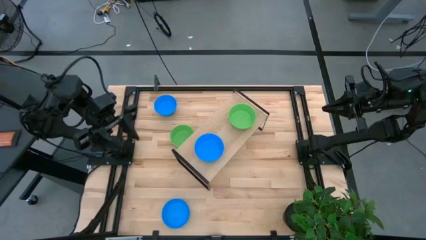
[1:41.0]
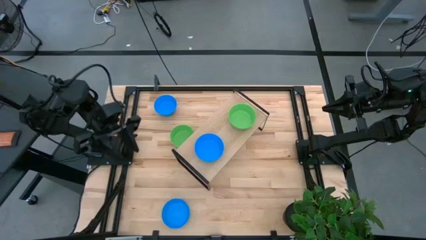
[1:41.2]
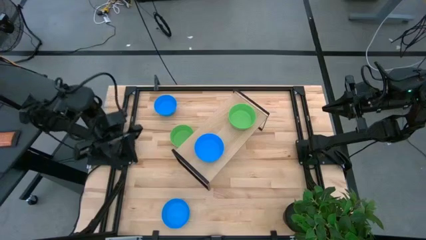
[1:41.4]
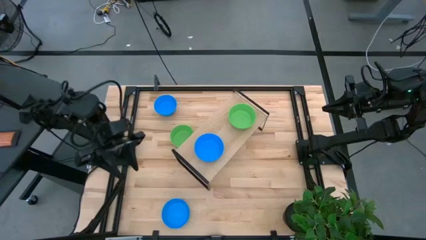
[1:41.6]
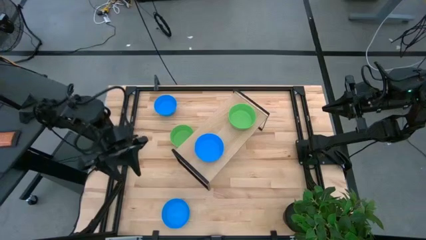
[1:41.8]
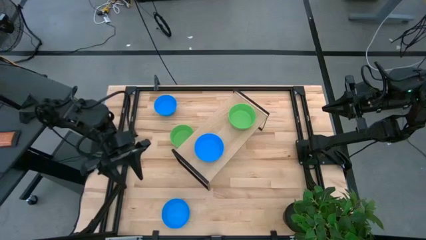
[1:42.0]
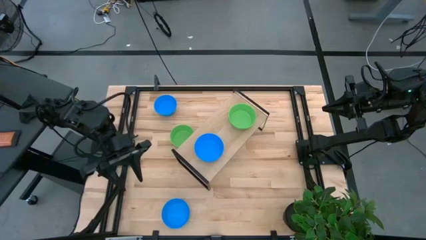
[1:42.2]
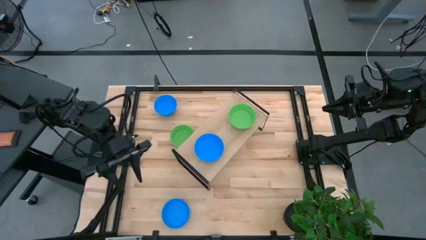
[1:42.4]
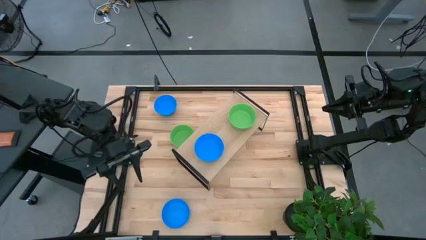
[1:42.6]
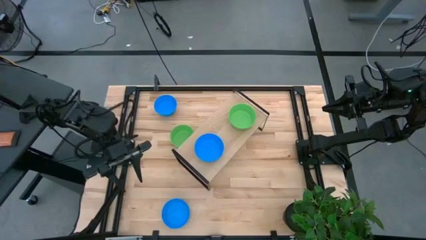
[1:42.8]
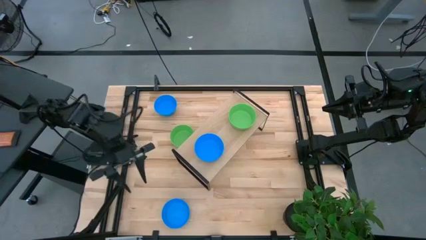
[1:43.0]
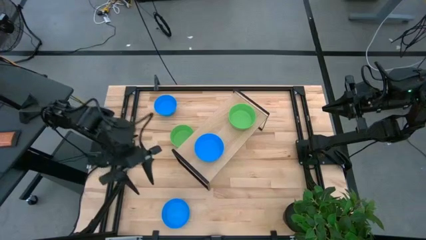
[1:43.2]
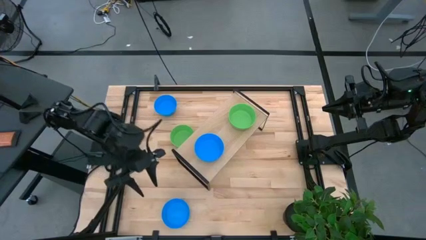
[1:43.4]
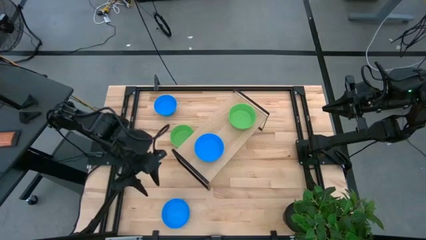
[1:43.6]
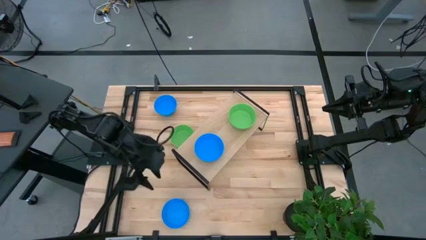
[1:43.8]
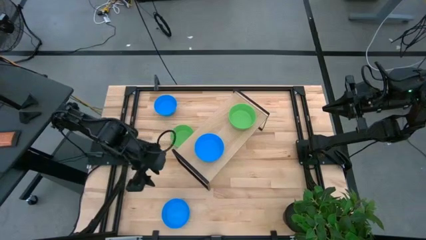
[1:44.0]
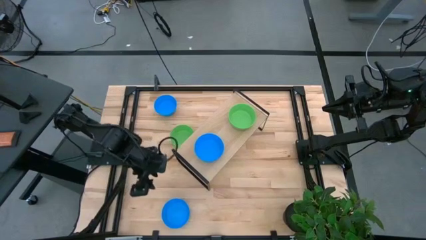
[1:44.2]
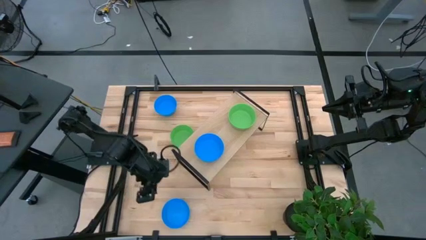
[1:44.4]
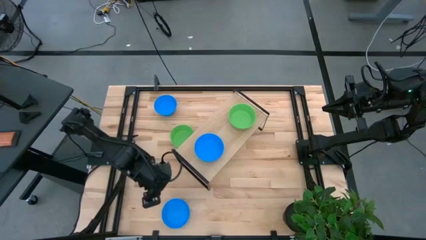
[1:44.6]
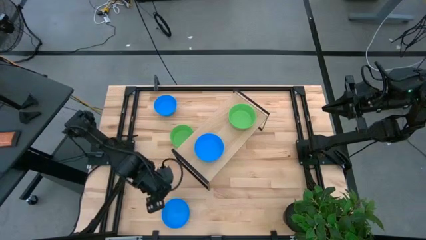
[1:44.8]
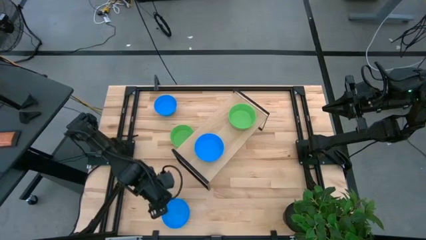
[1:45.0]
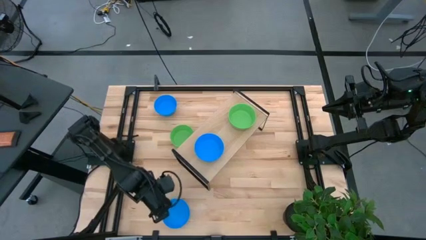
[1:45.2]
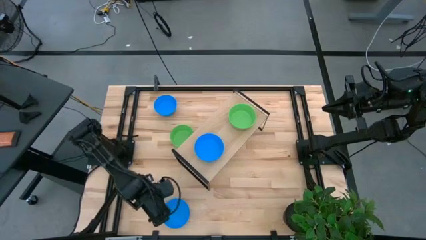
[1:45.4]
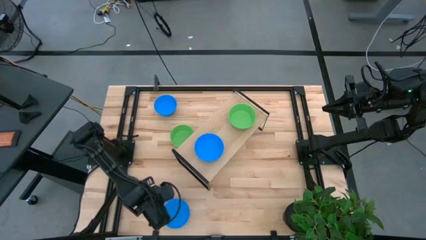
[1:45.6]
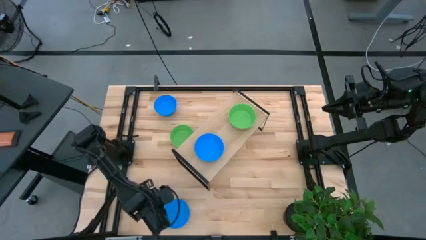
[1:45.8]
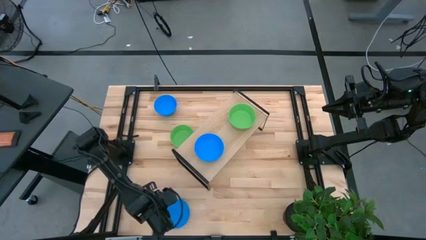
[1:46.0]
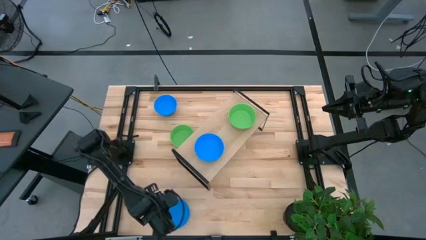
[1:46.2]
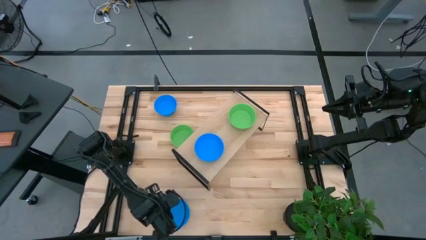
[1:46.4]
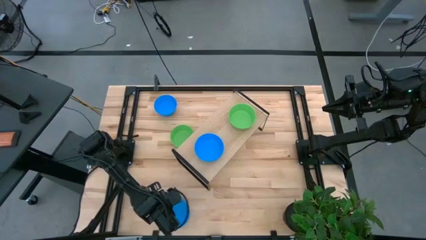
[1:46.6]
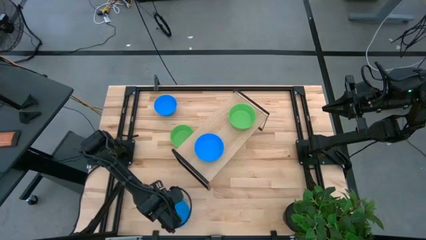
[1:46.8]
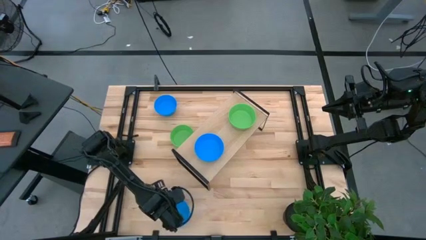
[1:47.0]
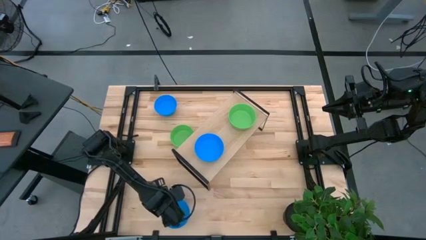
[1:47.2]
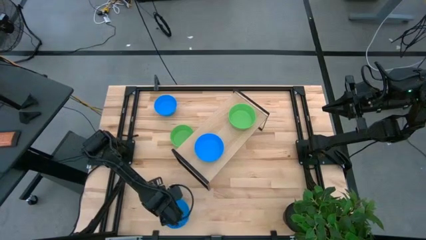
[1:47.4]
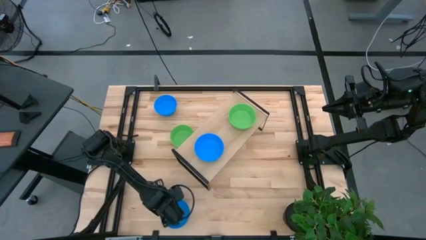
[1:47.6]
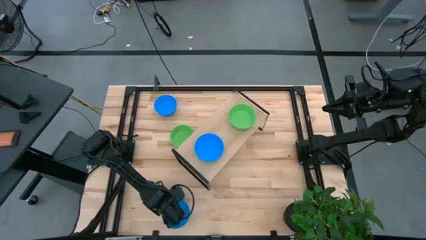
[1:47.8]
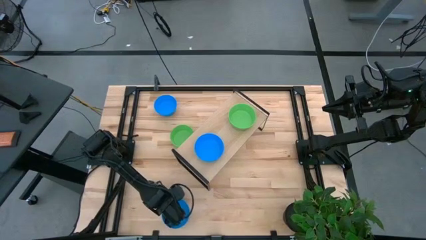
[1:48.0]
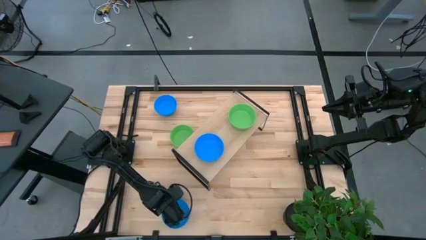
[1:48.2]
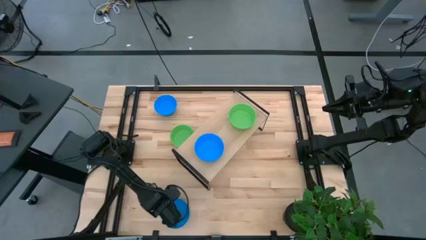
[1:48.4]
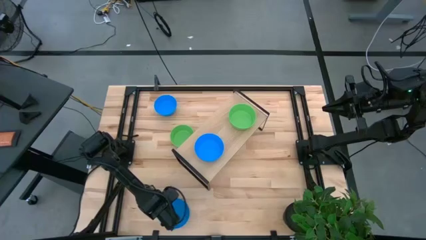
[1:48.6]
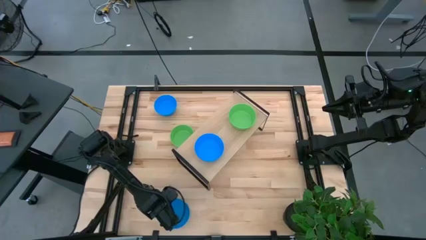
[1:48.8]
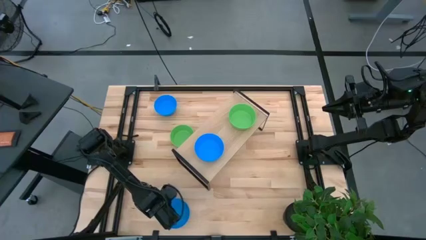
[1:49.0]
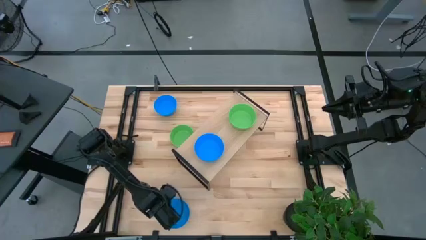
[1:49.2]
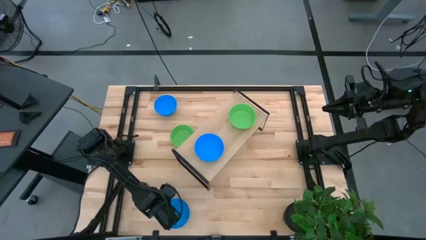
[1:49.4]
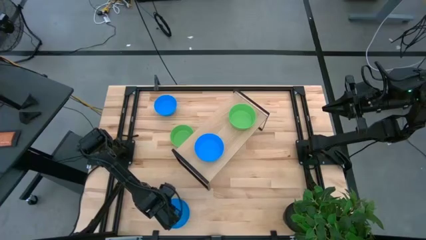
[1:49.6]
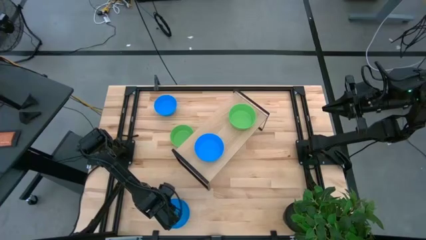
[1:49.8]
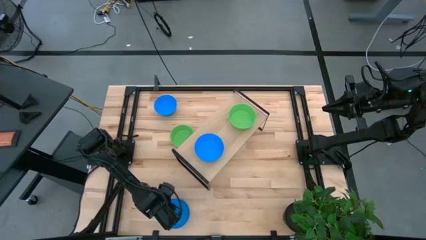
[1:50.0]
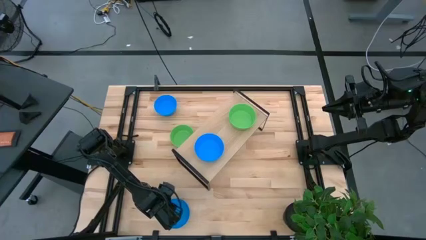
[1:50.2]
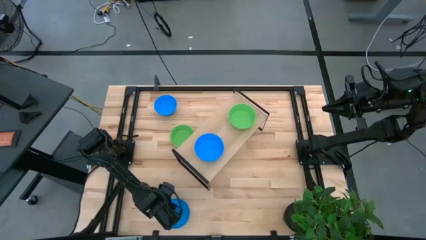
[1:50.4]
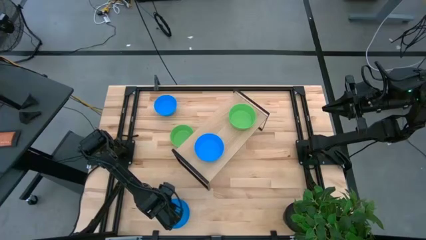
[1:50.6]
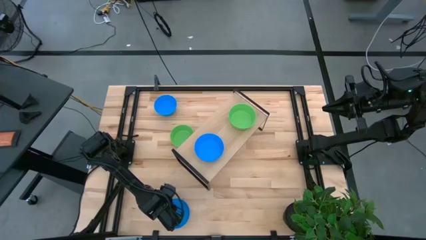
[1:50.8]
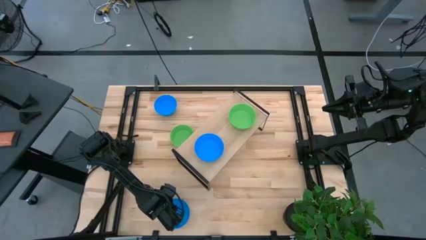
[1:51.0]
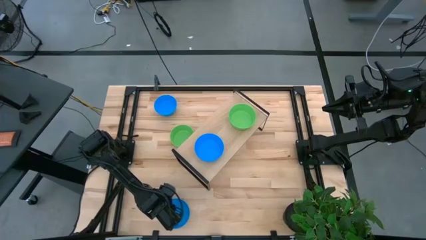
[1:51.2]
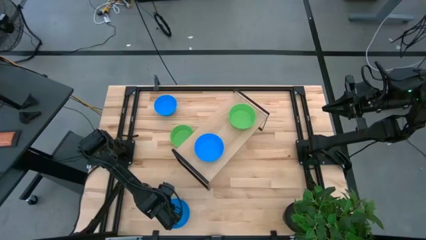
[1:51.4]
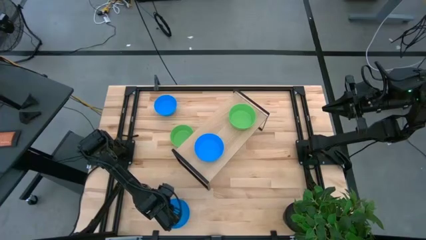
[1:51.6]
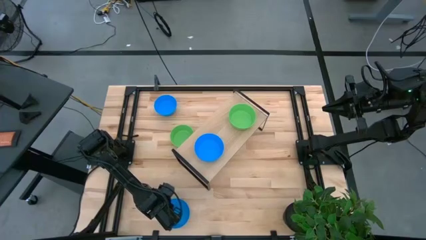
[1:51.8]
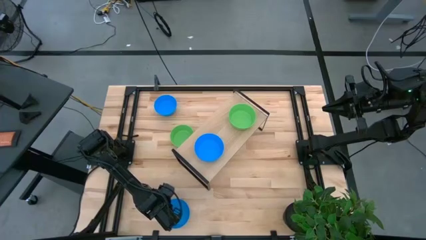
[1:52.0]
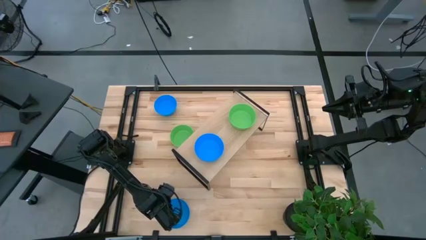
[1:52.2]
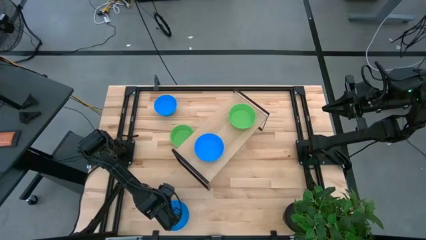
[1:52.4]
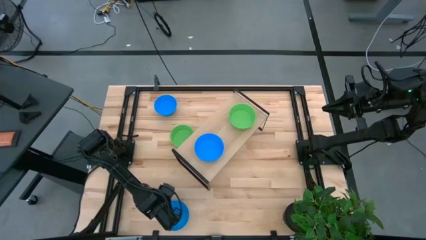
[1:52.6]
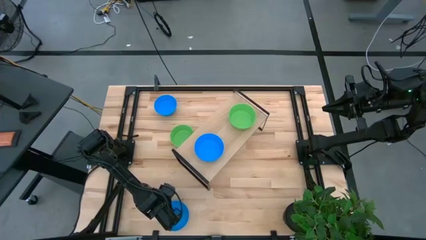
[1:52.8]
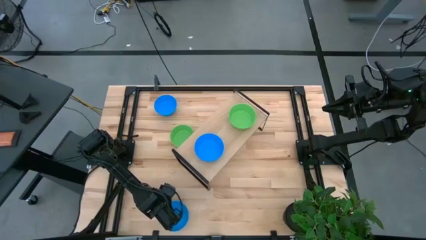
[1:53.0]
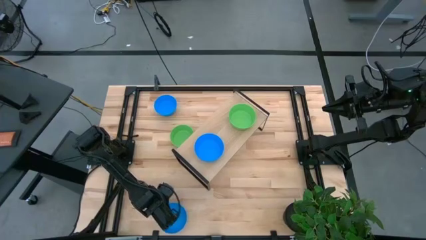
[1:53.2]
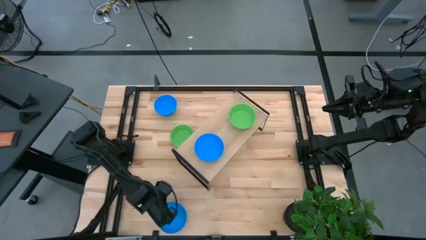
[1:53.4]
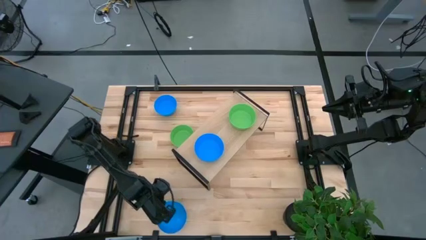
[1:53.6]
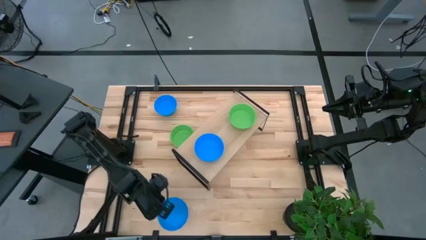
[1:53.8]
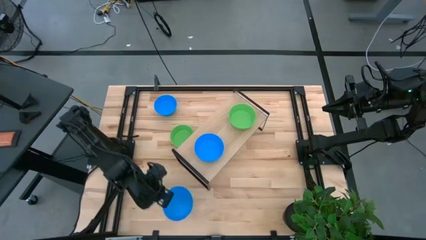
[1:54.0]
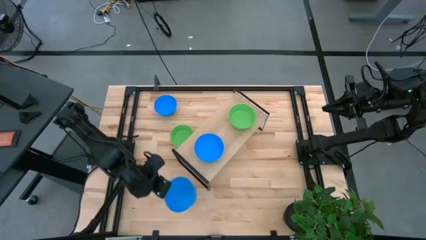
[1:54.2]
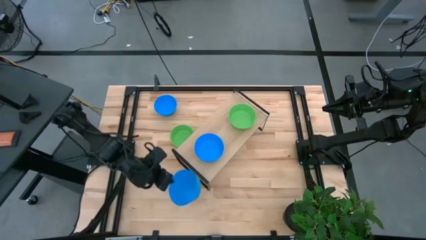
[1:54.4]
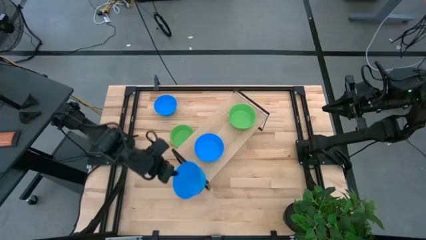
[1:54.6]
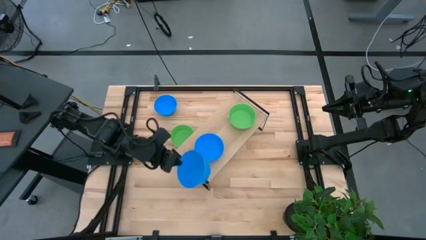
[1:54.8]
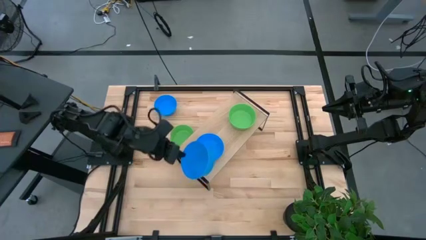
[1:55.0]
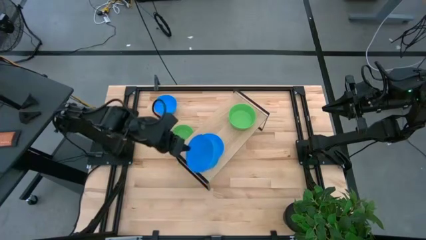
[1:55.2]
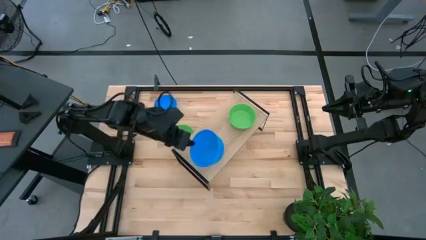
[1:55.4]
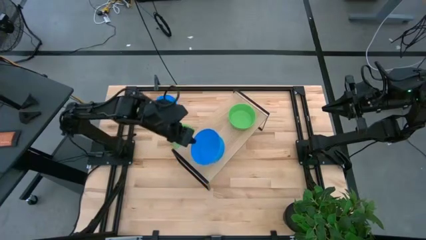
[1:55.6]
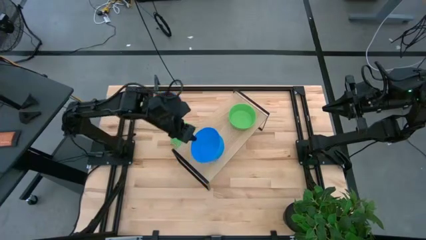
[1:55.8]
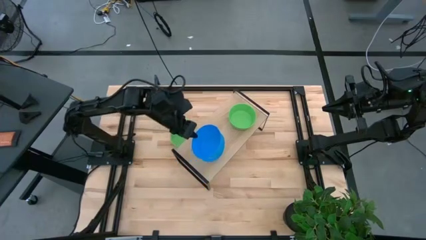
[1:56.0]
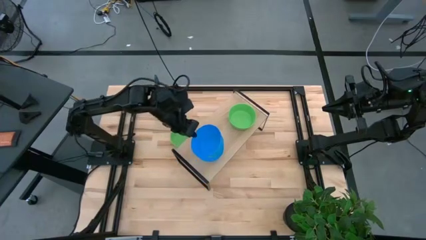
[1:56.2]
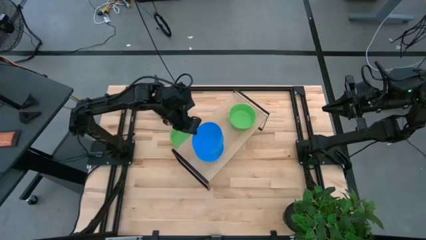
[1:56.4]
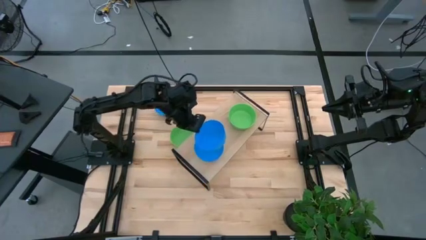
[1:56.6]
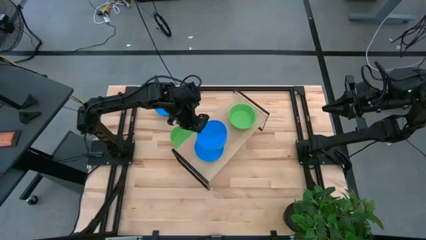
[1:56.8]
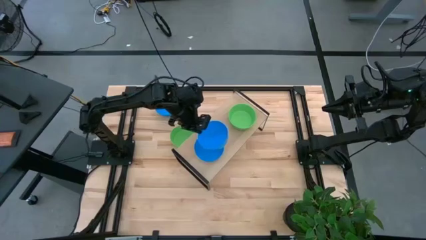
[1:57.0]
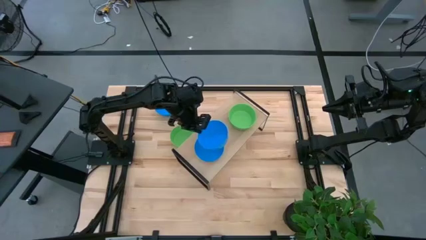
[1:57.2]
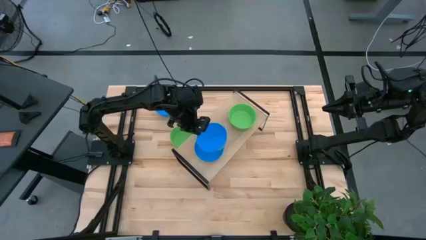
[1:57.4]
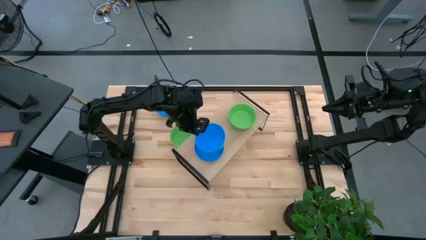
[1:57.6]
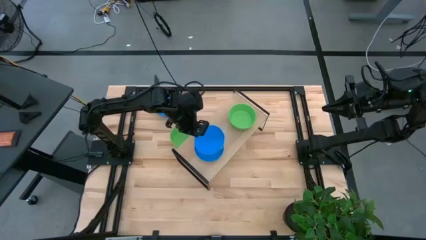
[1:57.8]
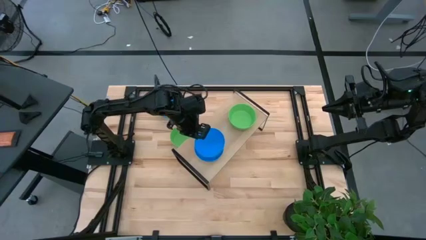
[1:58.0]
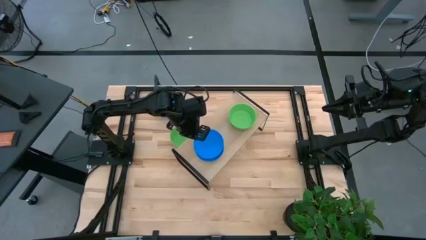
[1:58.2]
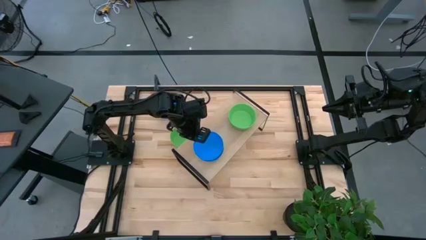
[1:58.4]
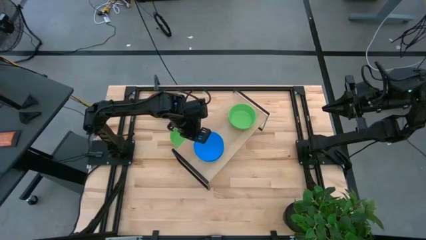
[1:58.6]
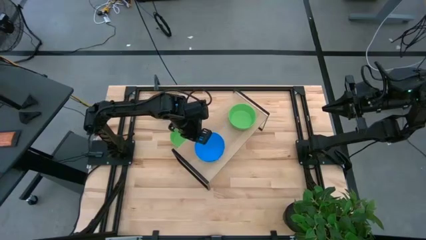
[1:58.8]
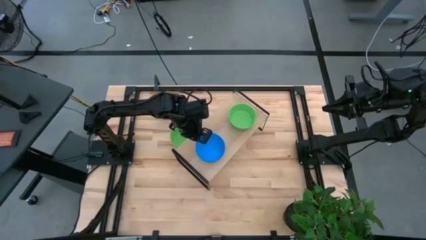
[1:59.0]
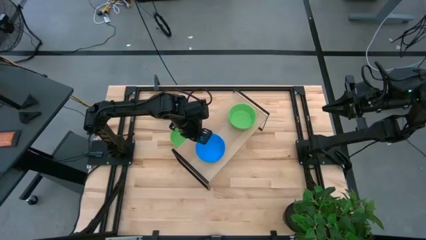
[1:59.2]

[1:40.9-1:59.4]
Task: Pick & Place Mini bowls
Stack the bottom blue bowl on top of the blue bowl on the shelf
